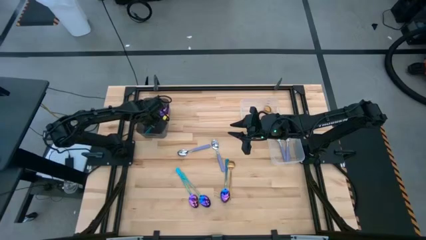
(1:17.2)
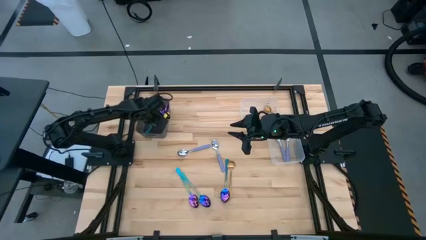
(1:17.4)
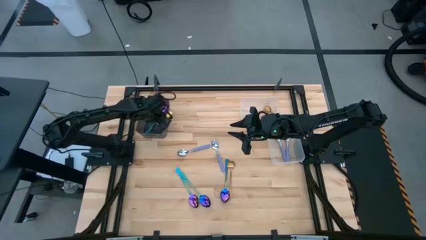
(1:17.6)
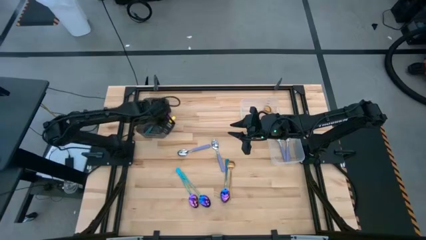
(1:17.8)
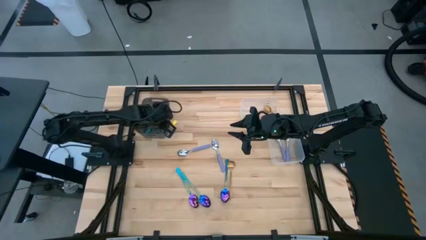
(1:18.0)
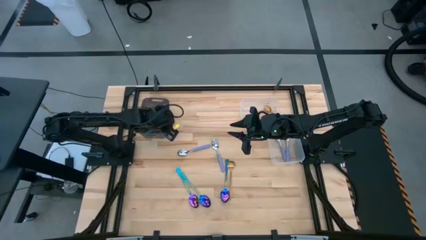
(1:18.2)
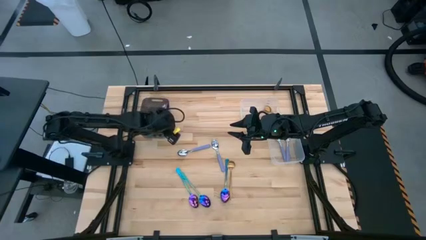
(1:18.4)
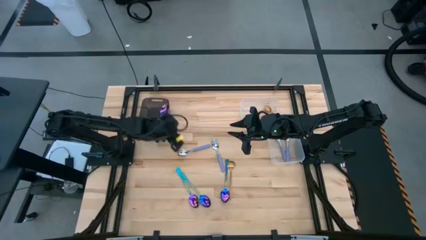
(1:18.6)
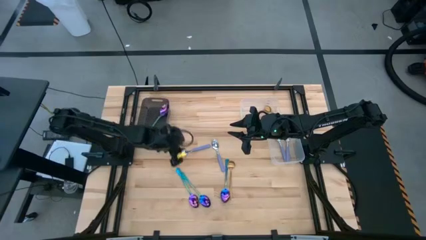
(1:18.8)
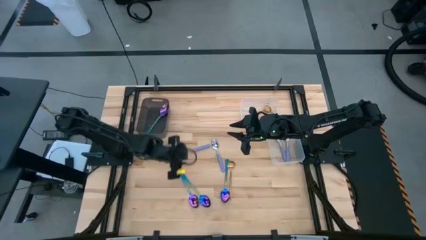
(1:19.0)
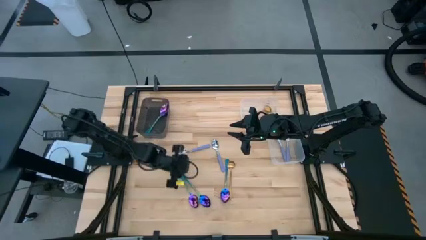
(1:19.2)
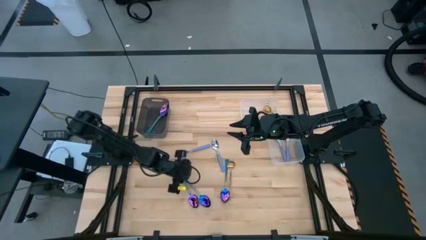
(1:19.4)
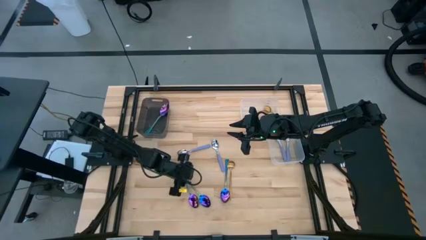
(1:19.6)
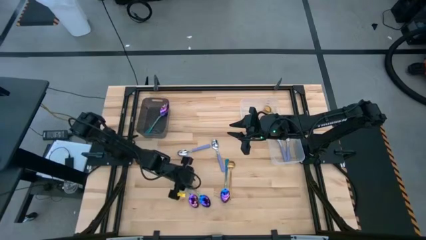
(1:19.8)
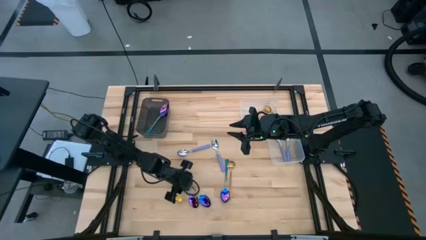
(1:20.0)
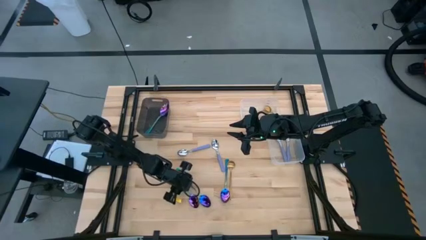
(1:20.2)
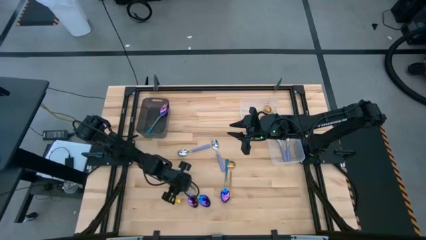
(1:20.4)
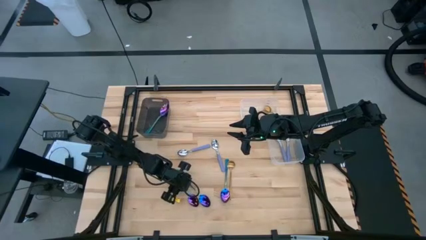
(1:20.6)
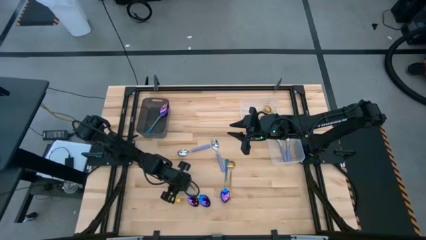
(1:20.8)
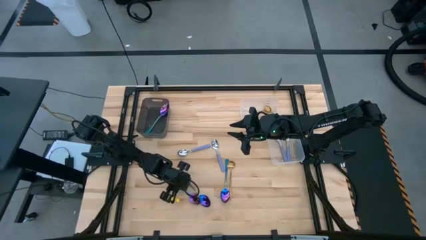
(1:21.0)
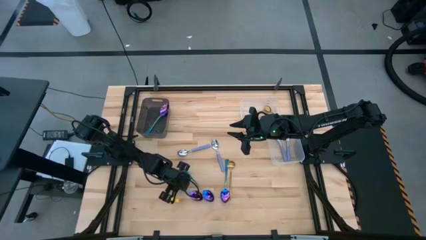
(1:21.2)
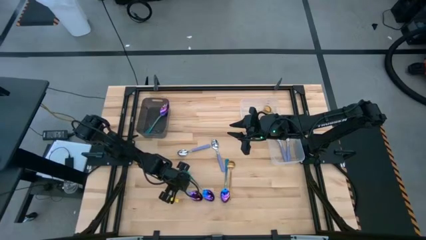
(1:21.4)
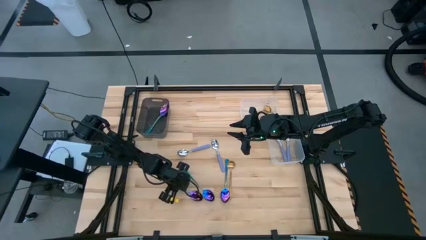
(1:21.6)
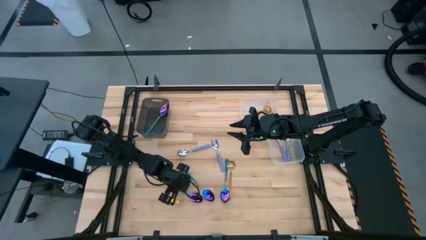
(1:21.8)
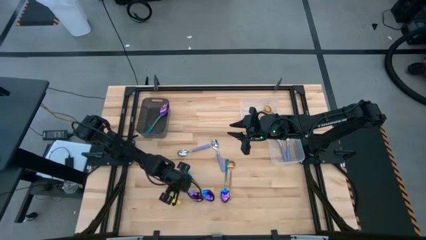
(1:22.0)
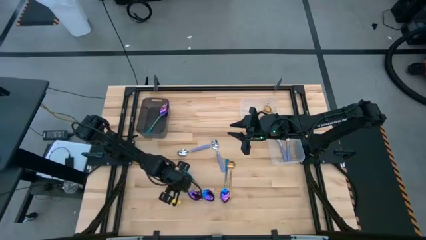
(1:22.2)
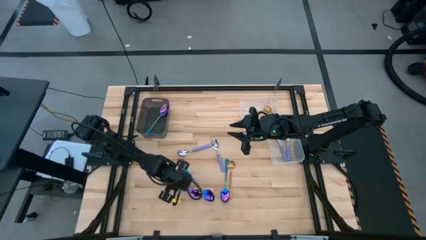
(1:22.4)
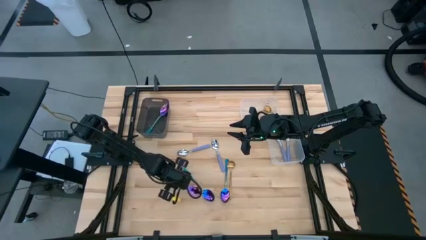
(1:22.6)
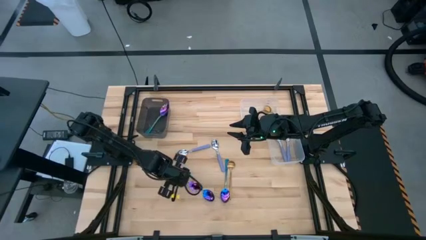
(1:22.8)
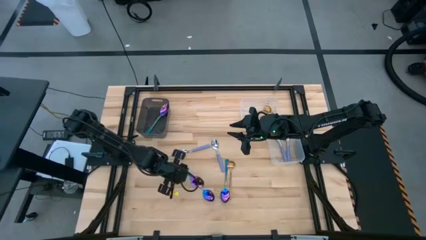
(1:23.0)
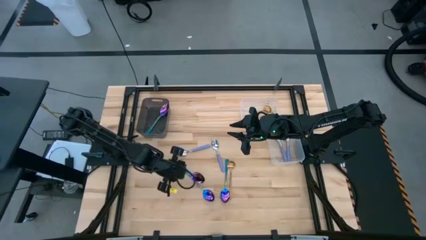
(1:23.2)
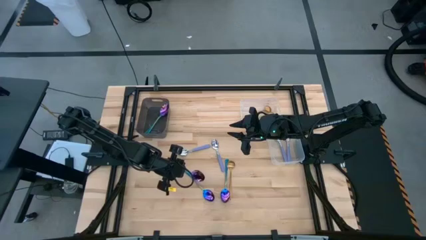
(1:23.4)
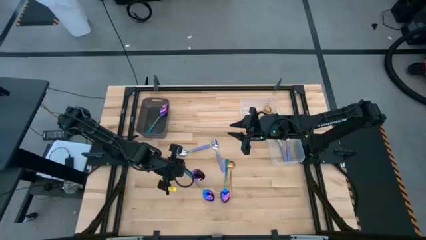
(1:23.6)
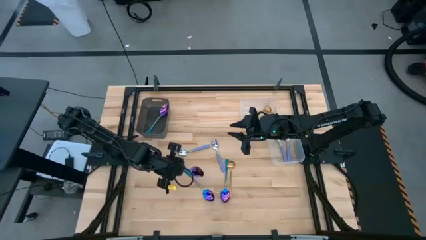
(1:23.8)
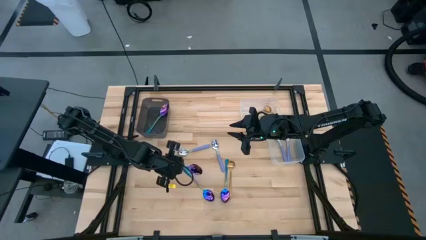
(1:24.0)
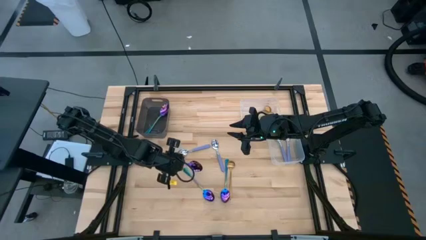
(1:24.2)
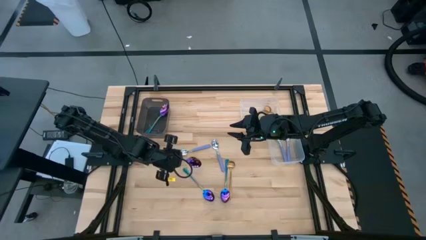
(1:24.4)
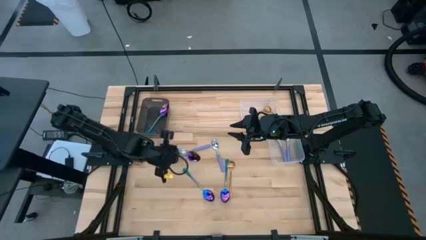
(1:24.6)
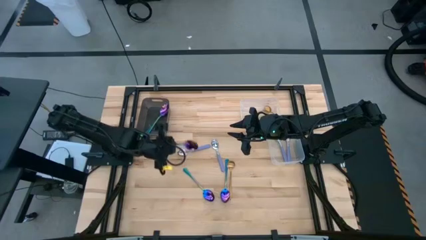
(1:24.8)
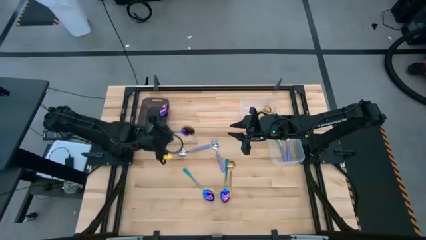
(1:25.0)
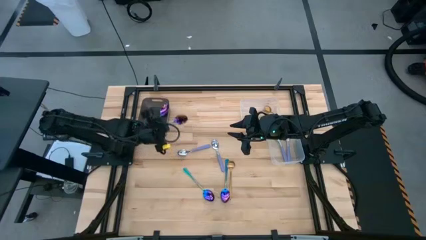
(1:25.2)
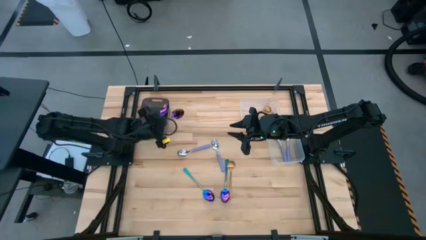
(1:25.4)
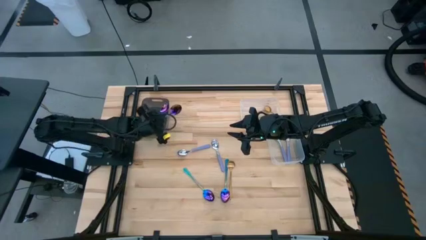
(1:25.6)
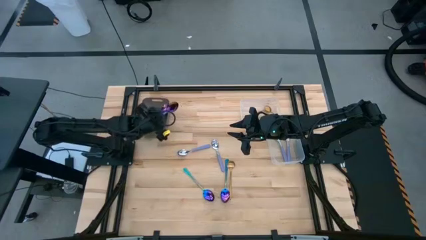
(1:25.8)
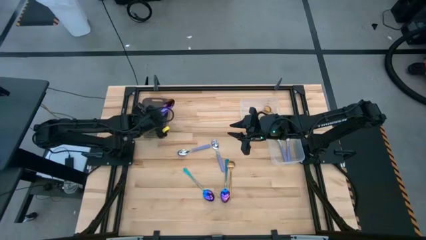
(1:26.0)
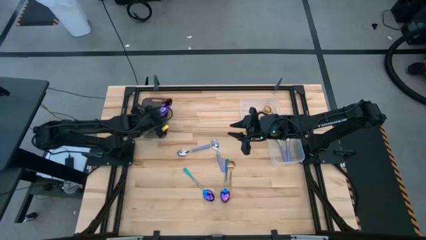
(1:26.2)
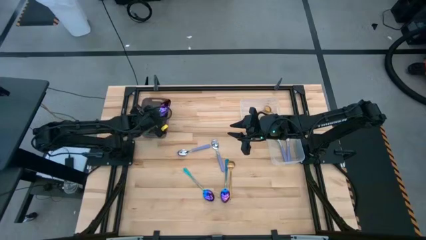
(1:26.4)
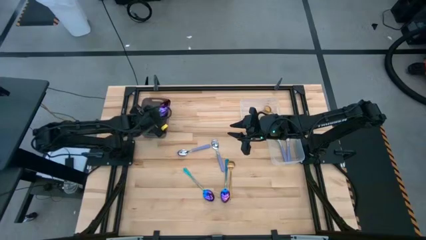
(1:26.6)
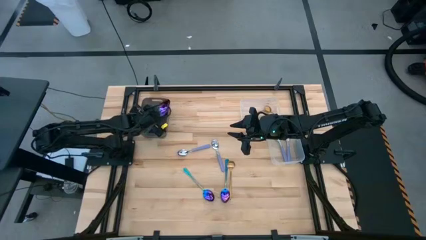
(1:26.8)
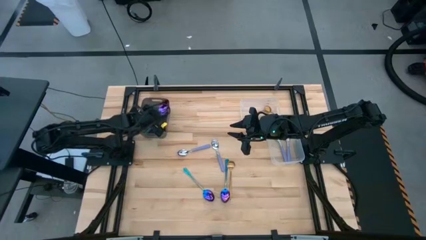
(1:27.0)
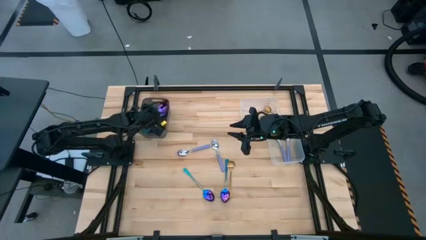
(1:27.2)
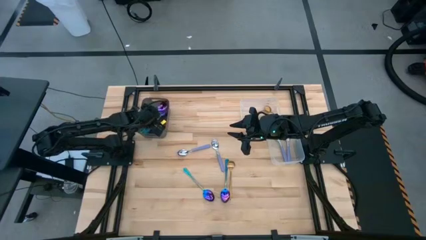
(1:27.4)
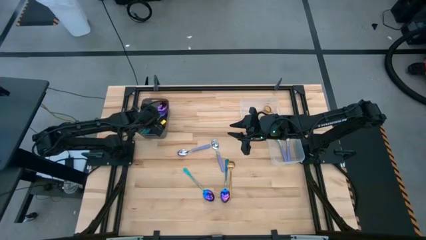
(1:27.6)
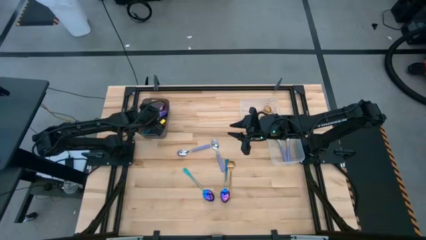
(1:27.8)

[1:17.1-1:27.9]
Task: Sort silverware by color (type)
Put the blue spoon into the black bin

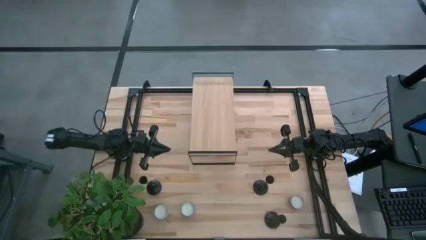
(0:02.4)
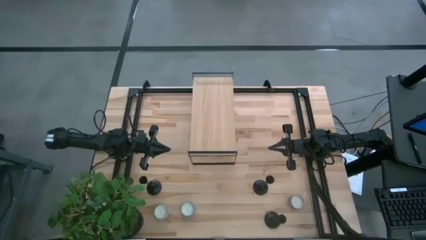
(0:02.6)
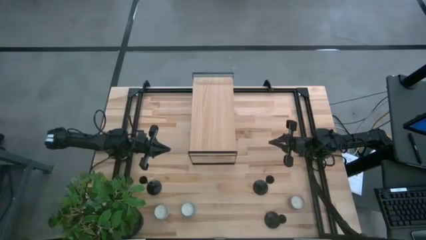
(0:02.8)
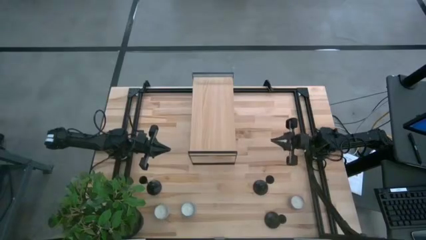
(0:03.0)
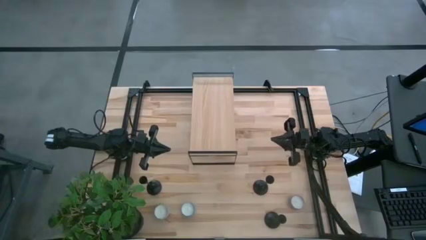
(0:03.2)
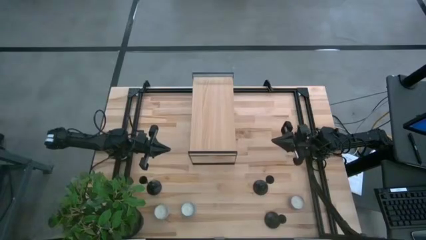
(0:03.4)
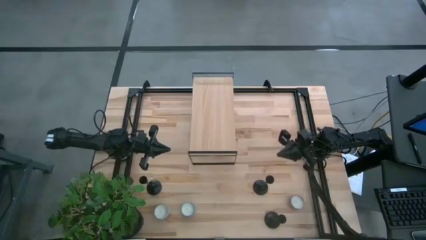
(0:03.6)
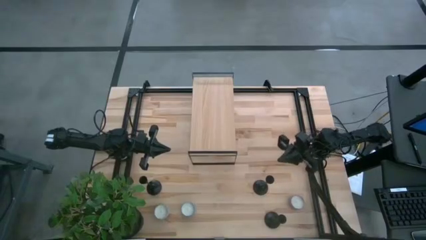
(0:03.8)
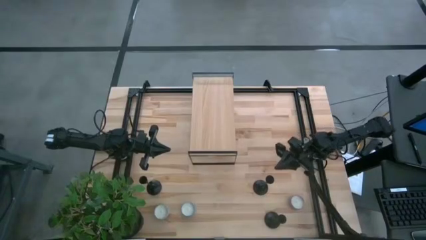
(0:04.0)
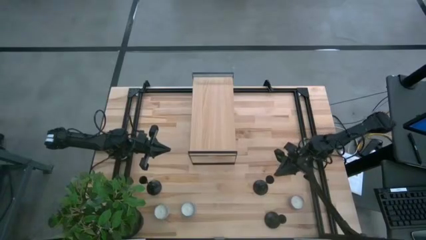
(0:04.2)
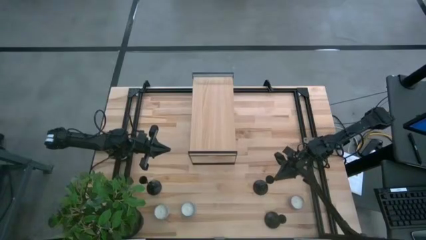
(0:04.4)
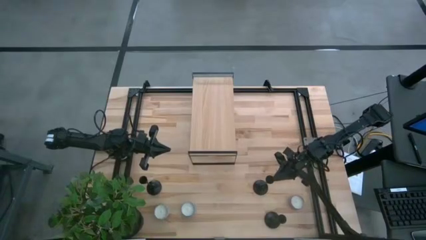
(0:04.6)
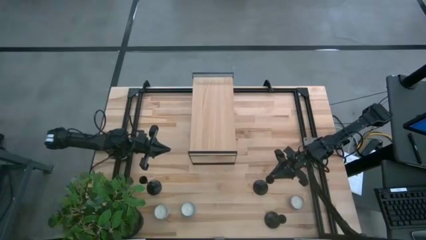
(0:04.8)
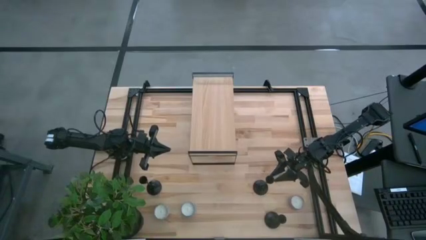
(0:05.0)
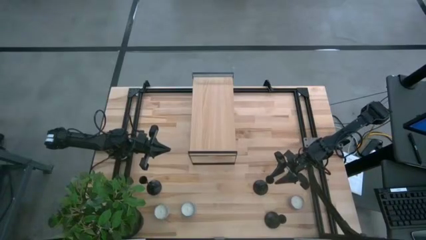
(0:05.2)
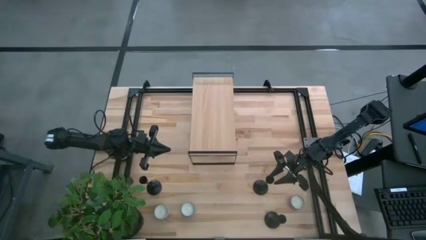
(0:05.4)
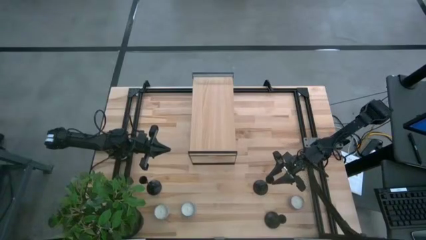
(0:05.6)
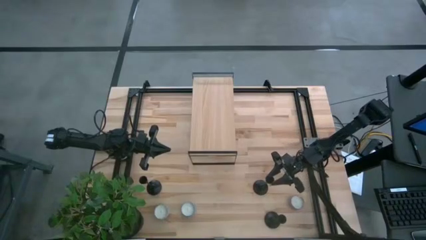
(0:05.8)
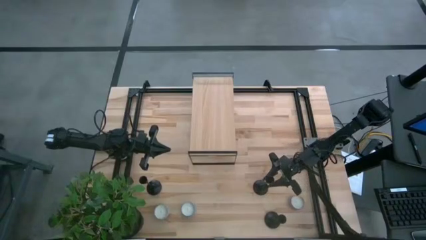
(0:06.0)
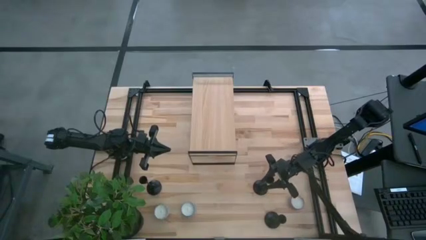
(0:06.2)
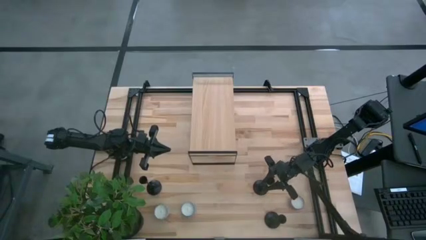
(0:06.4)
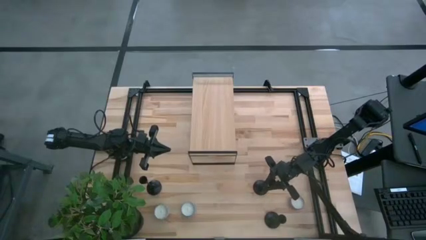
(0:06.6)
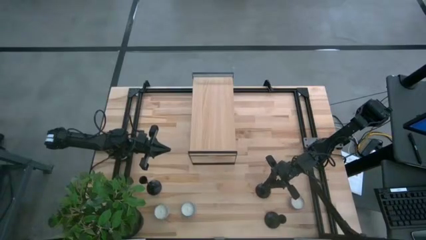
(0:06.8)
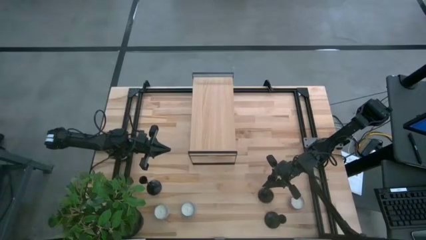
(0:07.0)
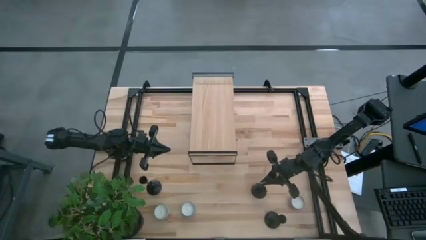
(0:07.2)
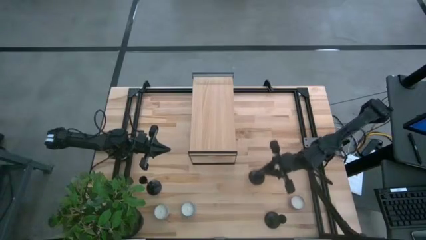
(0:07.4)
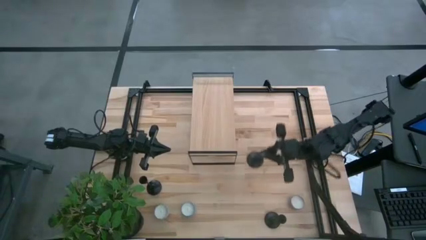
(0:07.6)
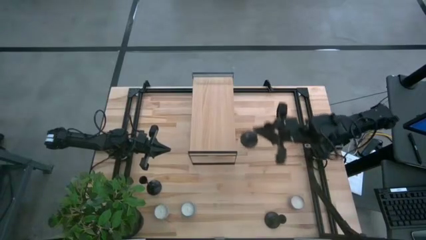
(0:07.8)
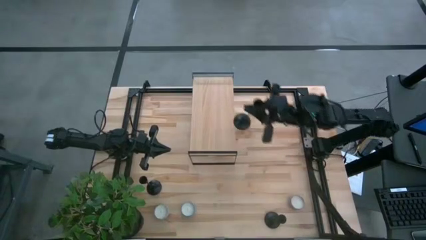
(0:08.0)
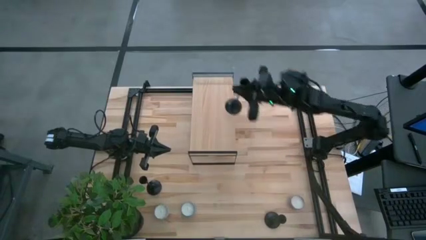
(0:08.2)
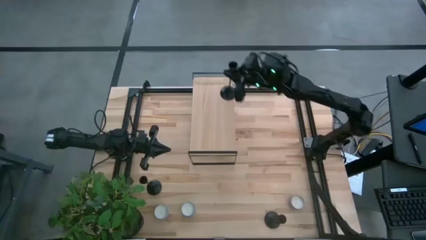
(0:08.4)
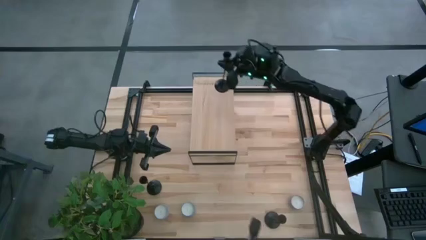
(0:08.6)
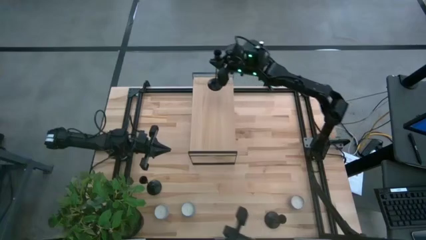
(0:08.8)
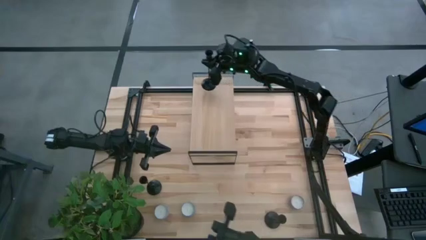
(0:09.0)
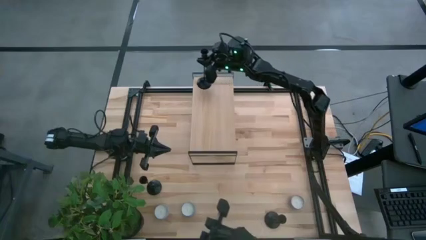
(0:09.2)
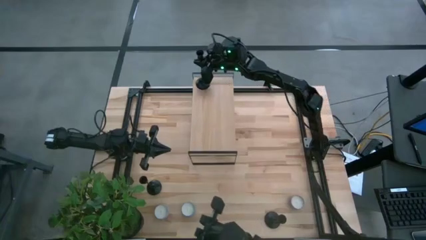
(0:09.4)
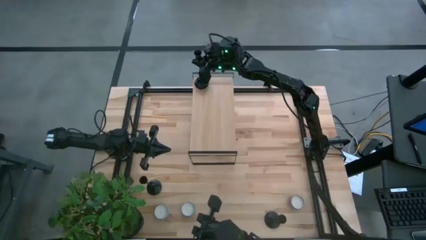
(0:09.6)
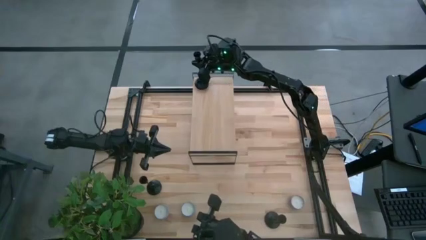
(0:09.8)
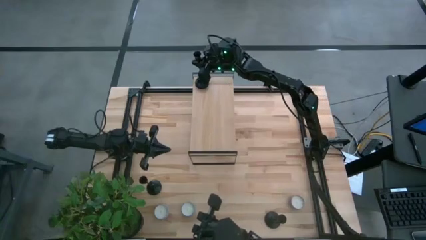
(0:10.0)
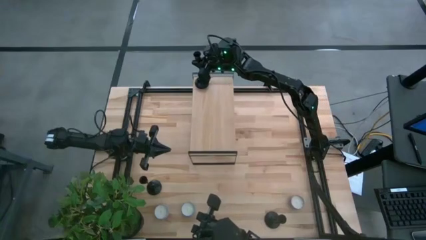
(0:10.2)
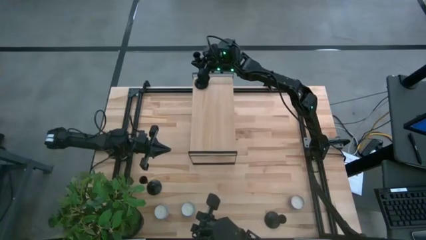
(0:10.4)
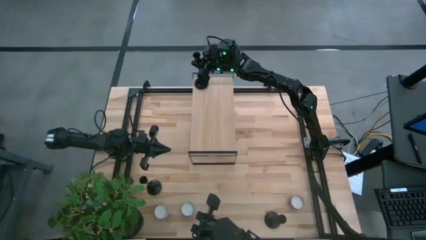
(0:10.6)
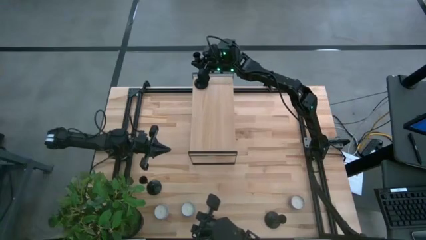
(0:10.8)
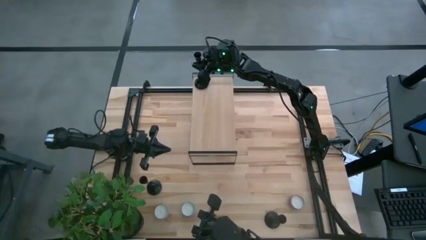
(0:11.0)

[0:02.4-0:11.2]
Task: Pick & Place candle stick holders
Put the top right black candle holder on the shelf
